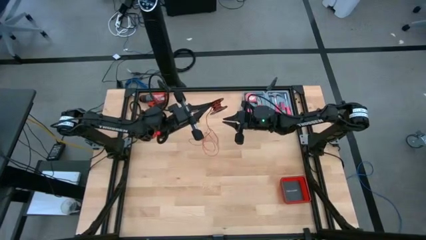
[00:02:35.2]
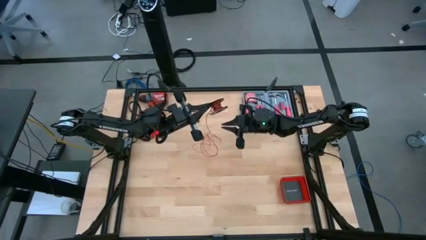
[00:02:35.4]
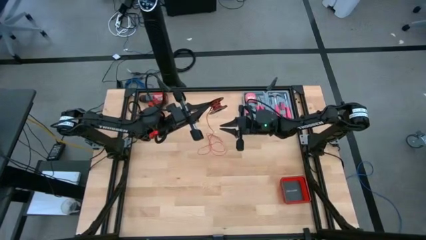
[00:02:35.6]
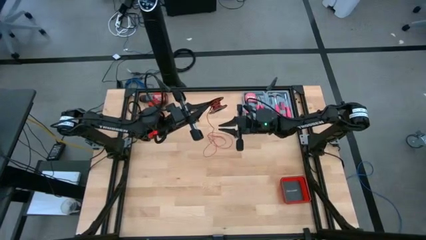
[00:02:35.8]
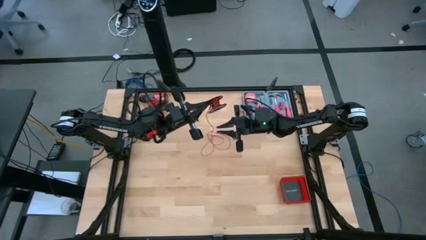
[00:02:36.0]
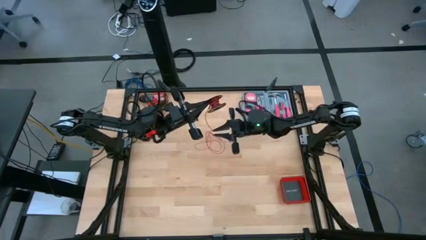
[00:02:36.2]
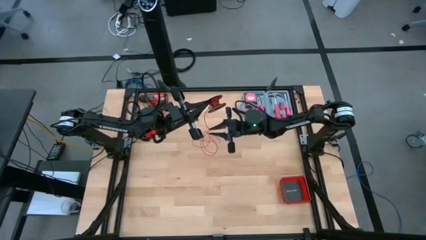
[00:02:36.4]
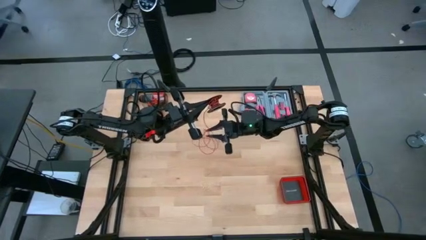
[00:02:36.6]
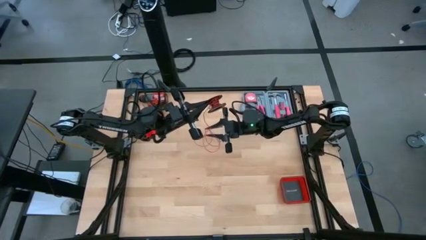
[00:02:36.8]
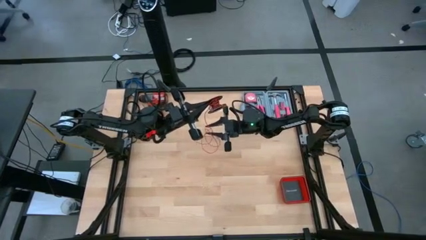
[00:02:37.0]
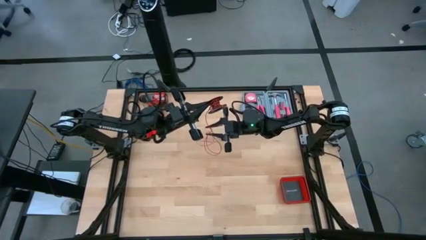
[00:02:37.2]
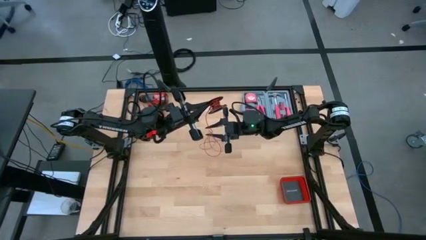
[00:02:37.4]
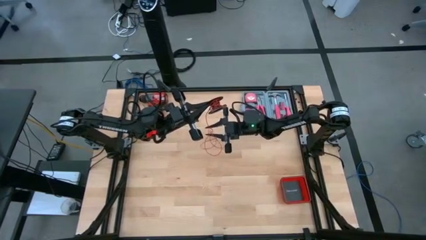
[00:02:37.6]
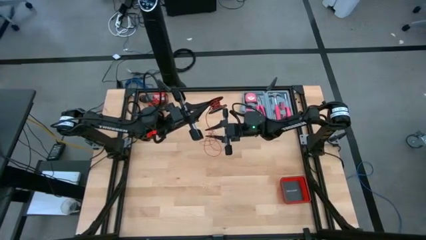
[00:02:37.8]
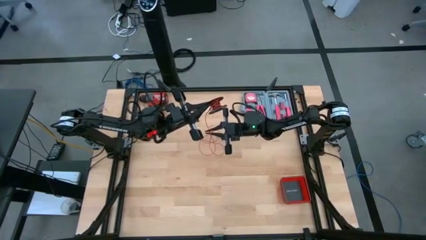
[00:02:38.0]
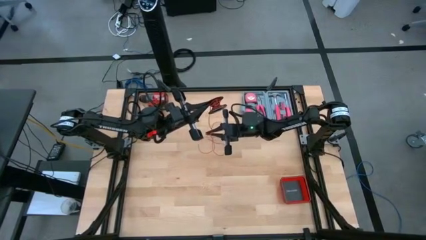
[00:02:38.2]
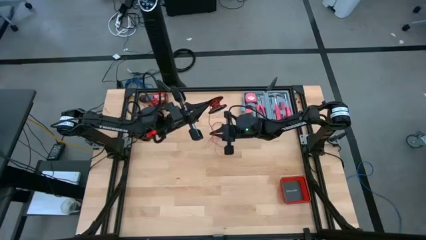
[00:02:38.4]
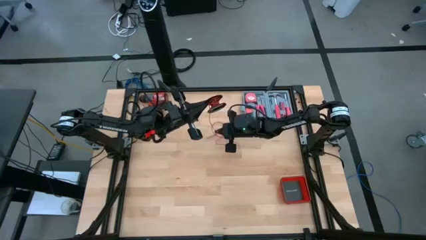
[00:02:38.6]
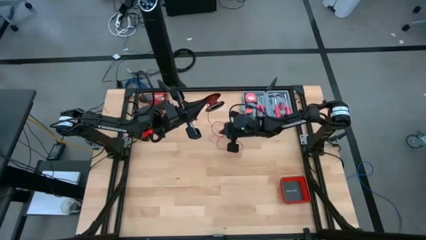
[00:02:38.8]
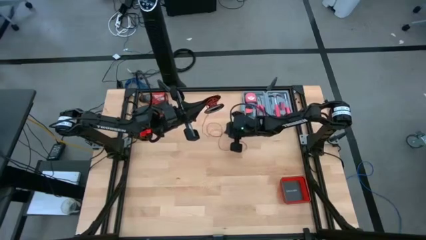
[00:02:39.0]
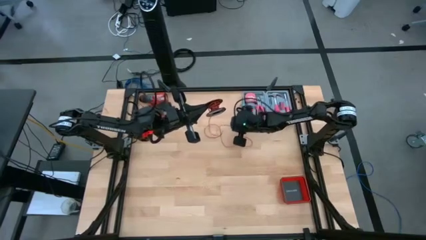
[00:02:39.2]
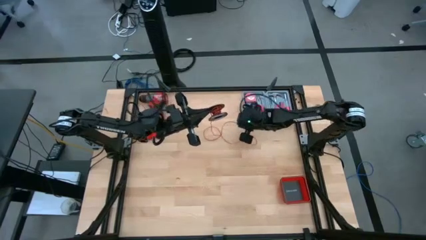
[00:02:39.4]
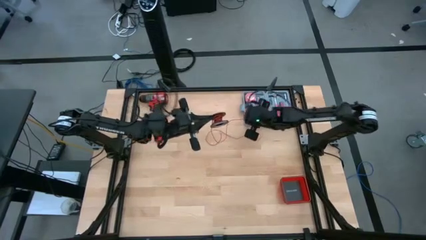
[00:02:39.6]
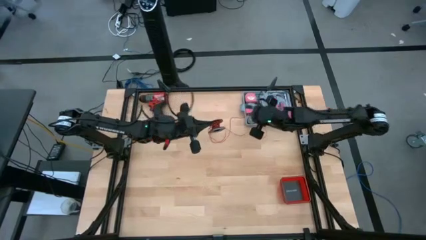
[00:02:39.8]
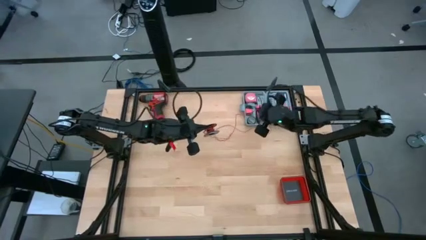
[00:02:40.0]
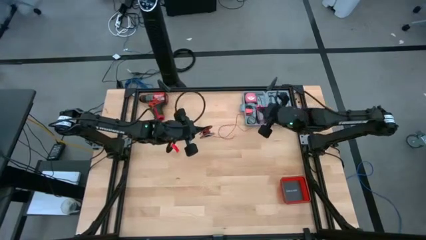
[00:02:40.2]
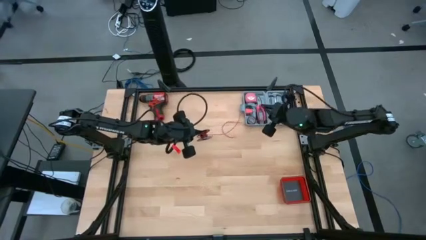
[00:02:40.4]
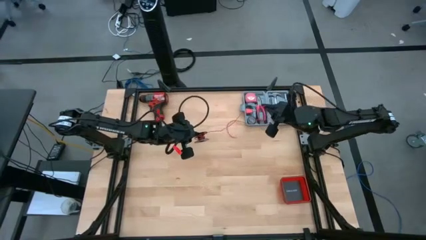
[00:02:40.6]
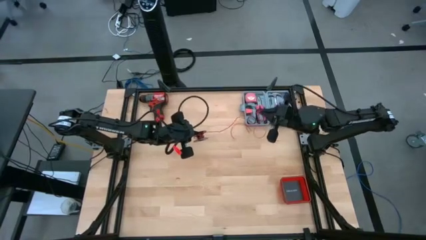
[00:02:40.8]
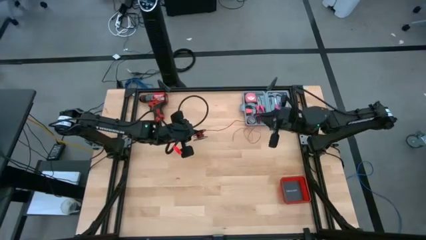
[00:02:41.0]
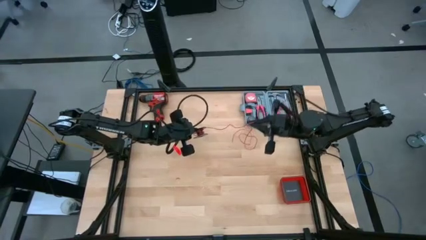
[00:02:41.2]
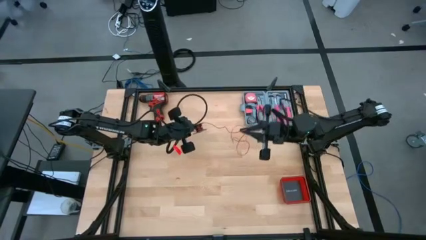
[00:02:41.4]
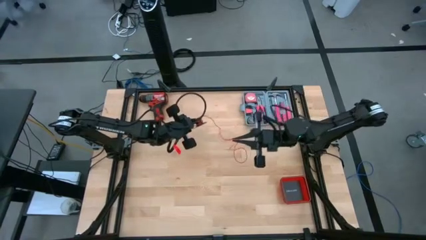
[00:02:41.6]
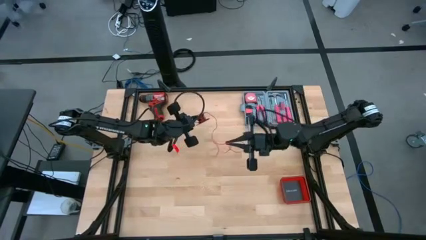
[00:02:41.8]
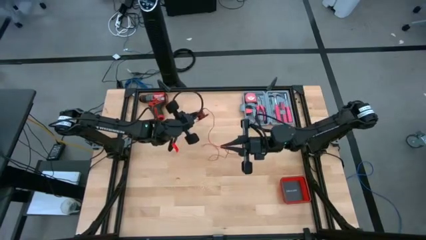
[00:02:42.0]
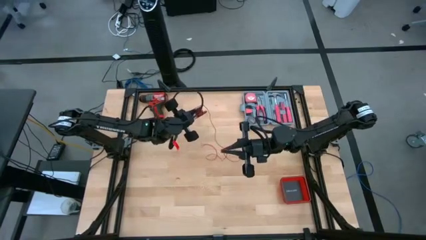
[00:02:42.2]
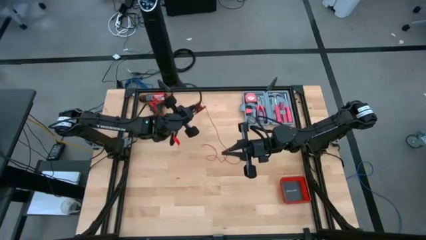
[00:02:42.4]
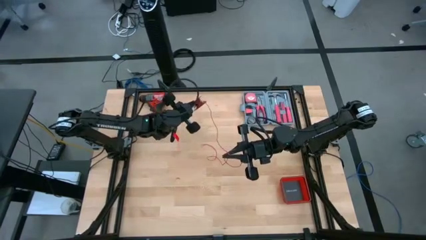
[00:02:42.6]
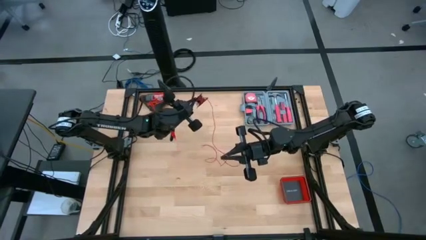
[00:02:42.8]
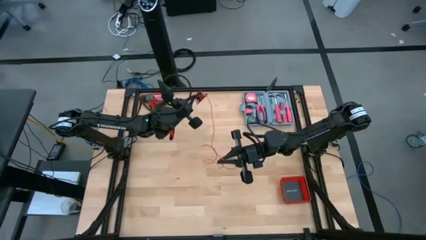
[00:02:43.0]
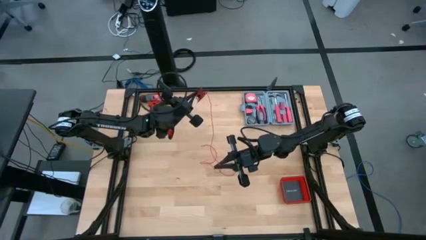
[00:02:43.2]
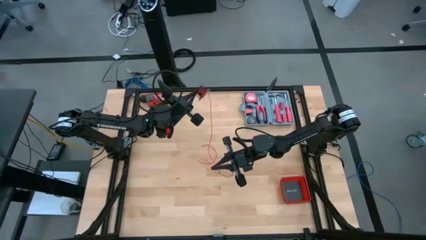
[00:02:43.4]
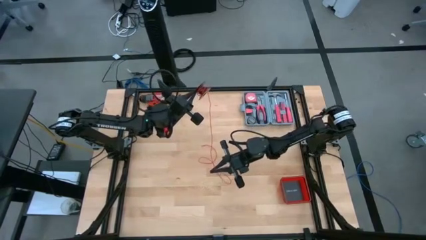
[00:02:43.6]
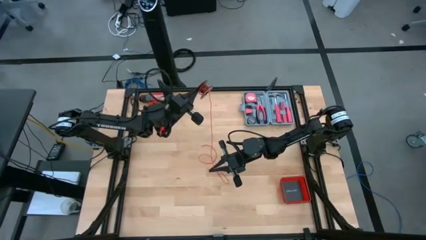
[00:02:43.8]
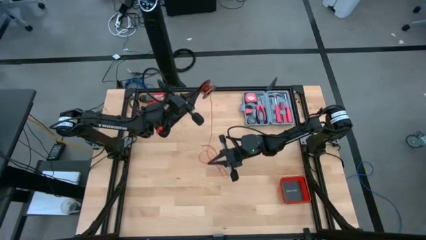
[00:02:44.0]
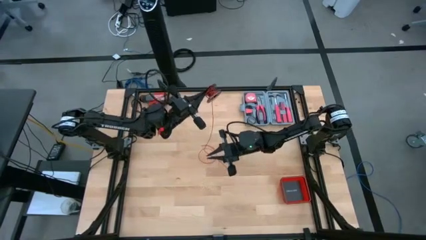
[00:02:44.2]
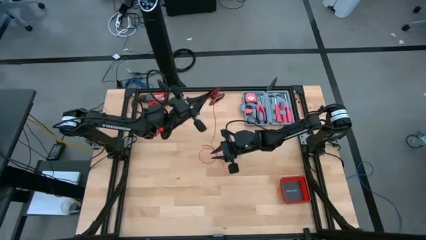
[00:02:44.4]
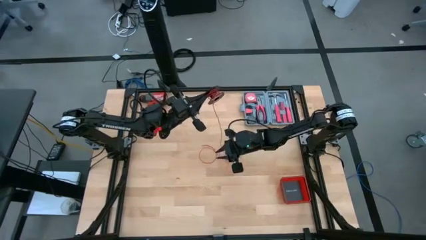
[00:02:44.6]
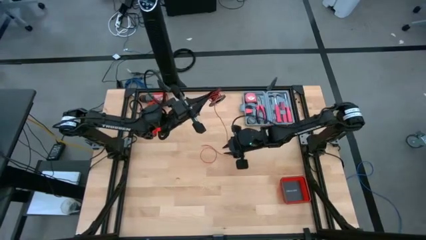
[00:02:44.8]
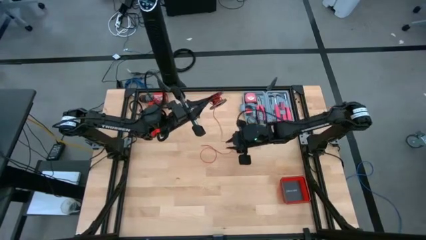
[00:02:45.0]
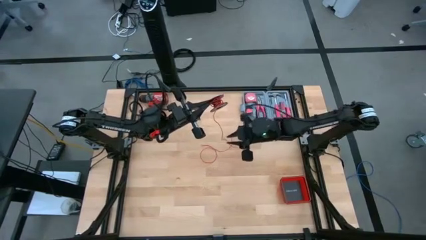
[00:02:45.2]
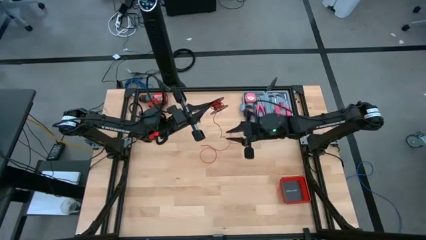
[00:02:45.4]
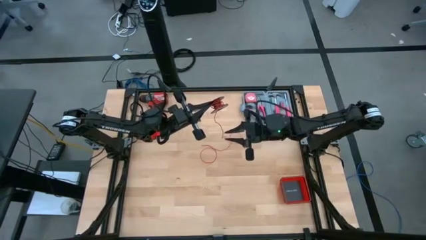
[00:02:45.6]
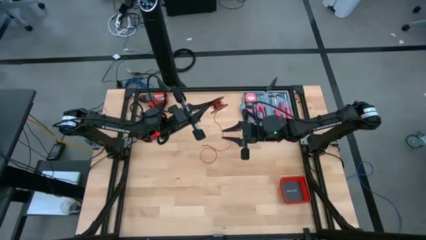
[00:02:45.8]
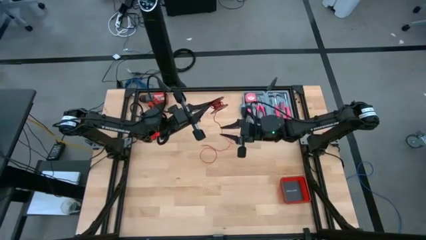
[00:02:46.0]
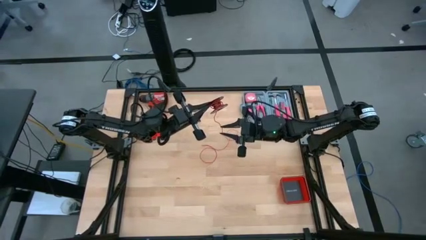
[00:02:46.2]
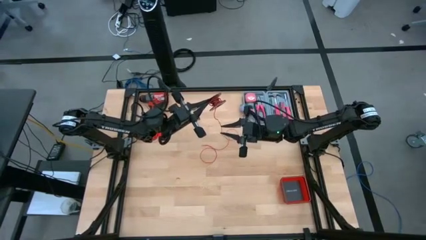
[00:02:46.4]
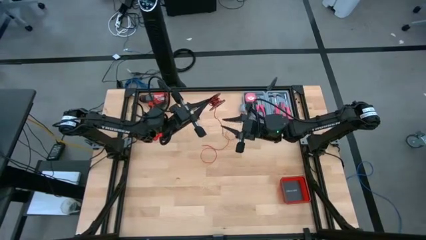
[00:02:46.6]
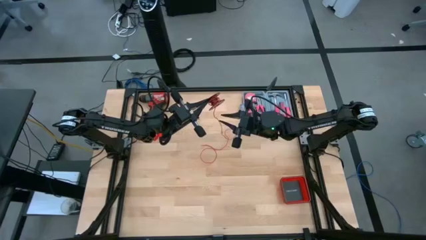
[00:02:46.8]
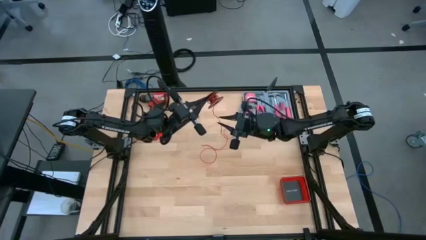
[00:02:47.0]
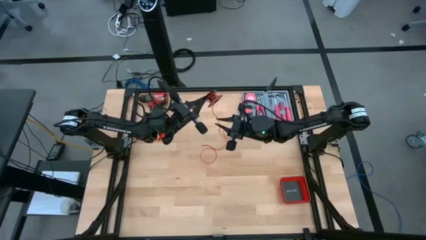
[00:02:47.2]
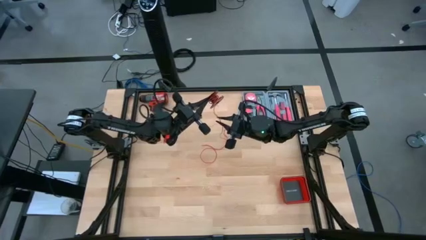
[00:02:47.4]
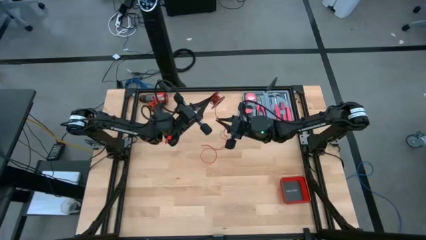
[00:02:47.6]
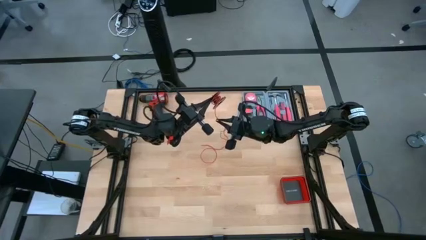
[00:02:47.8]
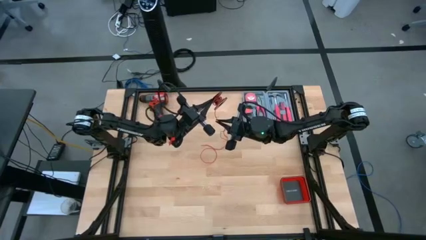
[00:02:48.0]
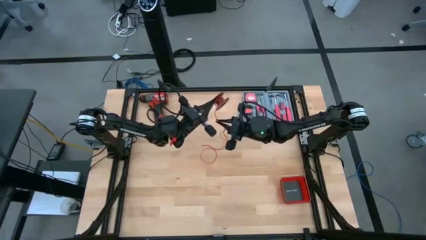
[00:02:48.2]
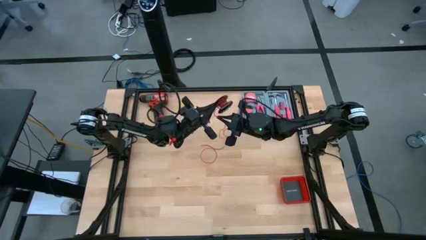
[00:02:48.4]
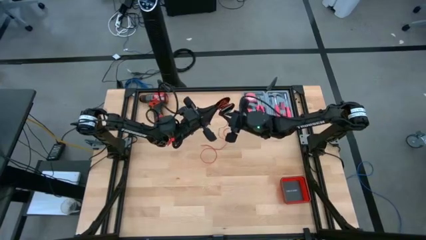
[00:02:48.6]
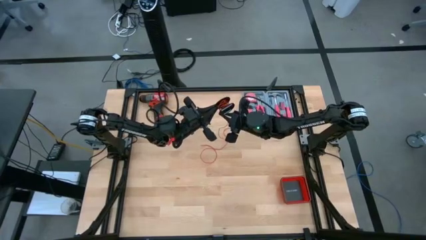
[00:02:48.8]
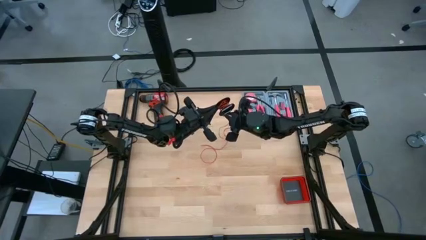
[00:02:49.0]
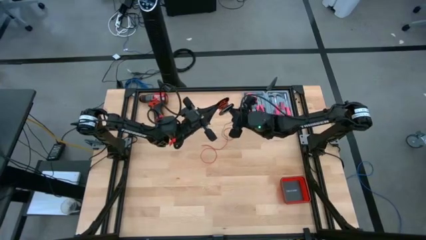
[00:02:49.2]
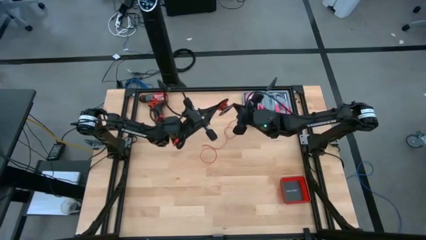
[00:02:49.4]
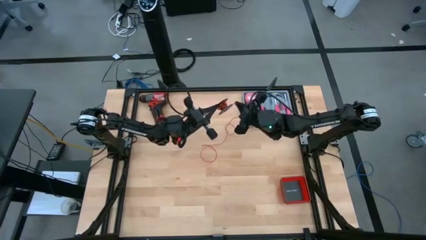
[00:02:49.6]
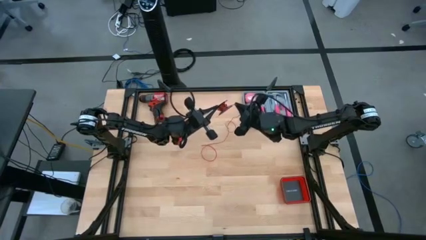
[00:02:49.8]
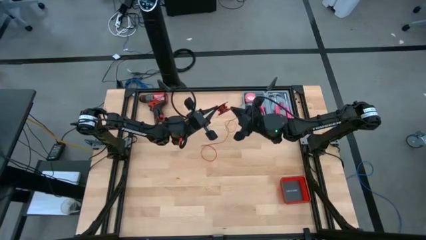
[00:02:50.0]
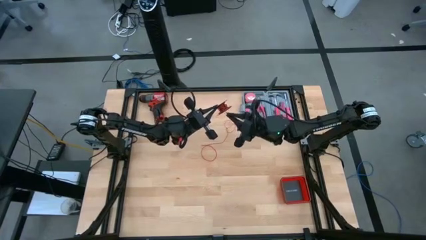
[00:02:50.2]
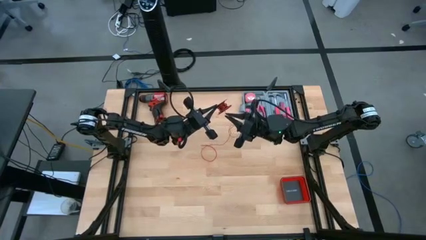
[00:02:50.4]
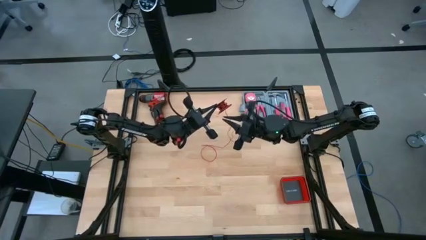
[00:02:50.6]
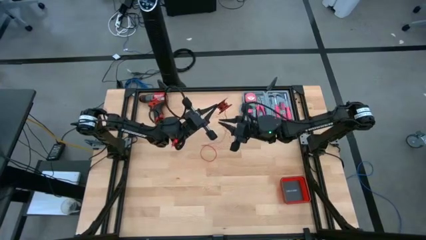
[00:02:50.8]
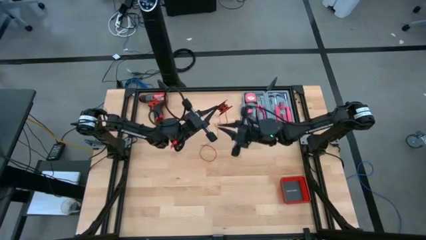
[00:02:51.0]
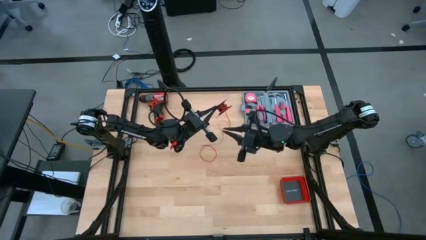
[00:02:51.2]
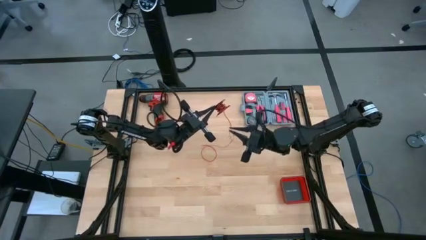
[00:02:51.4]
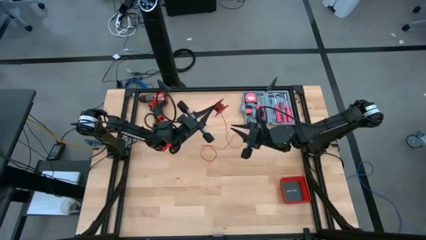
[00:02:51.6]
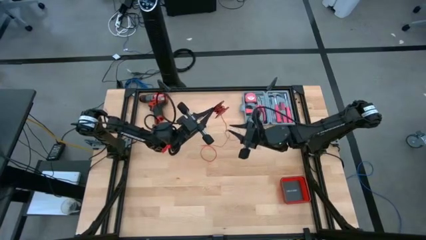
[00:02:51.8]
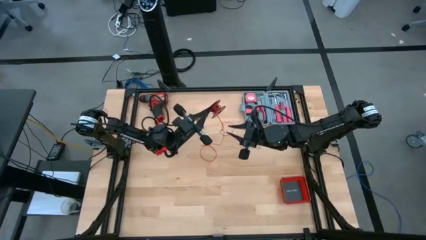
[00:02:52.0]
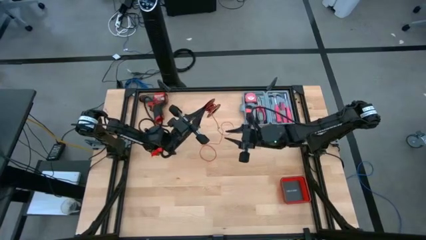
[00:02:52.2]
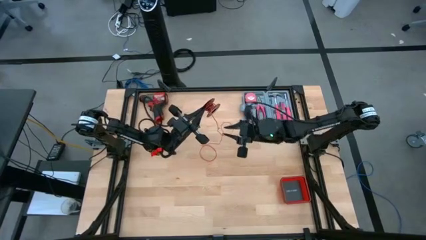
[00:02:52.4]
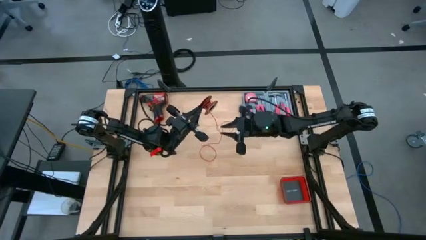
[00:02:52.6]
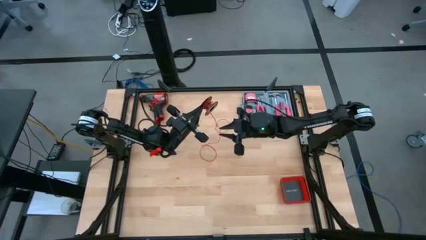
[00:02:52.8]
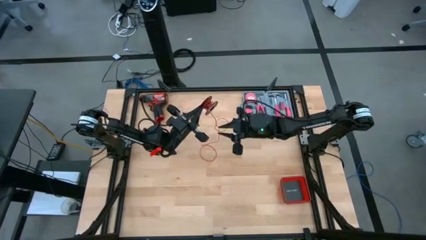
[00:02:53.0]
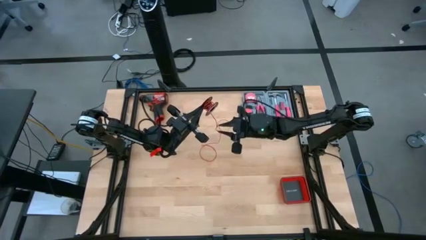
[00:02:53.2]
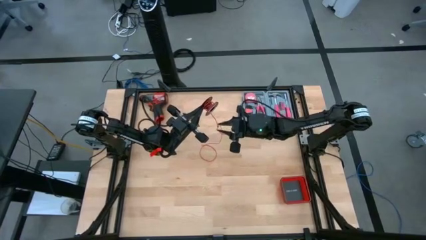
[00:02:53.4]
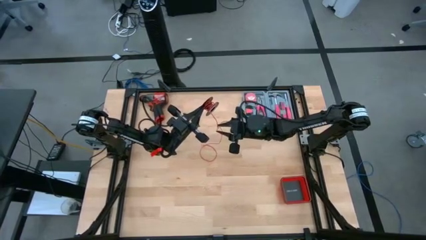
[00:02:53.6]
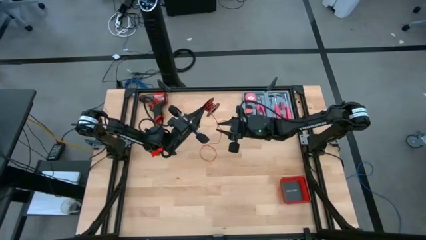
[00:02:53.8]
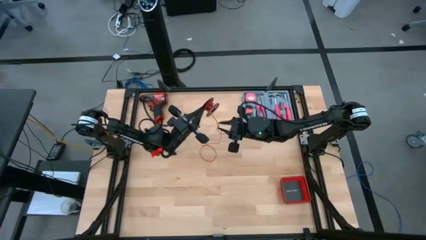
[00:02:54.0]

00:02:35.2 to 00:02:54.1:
Task: Coil cords
Coil the red wire on the black spool
